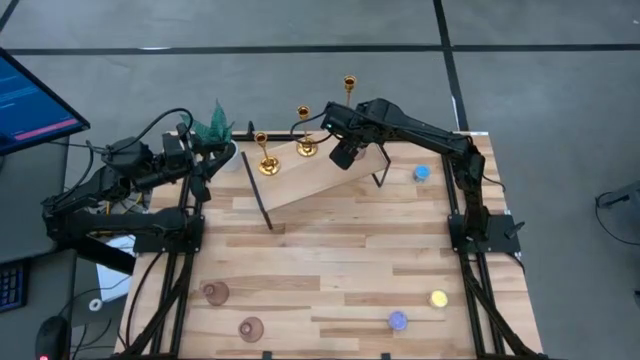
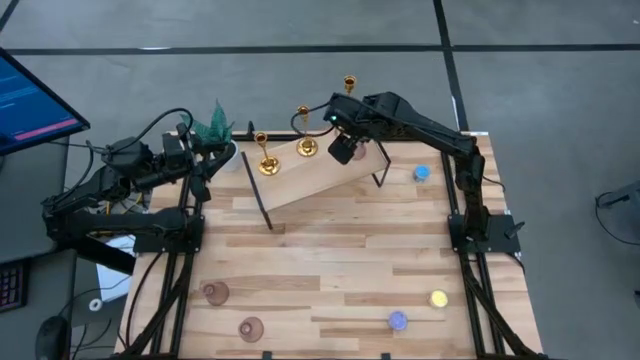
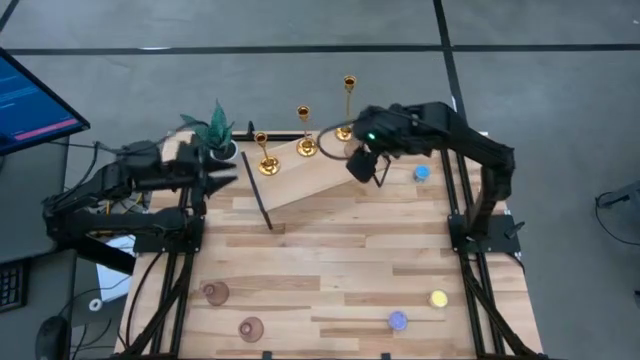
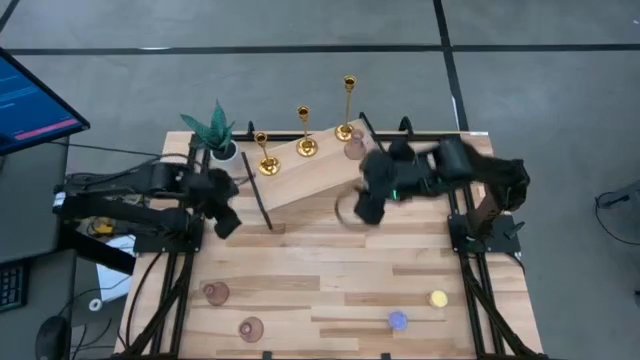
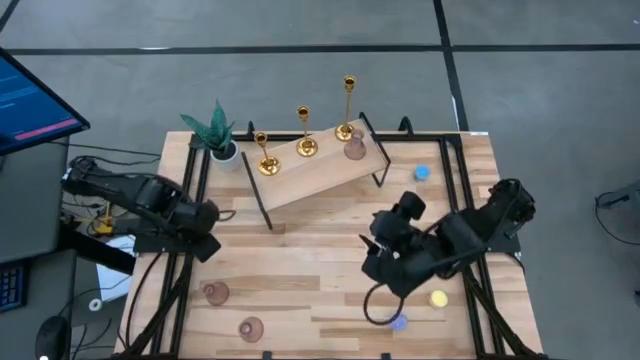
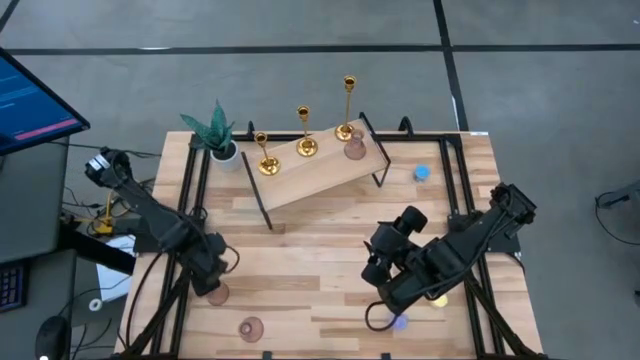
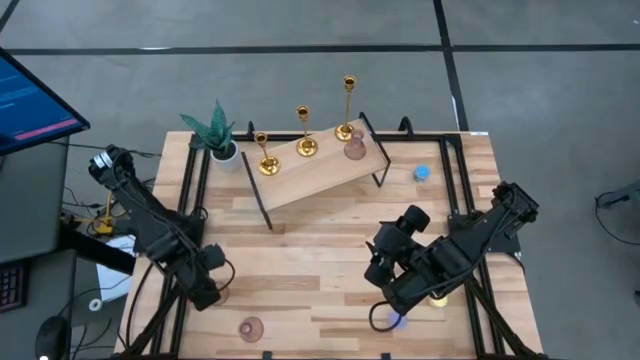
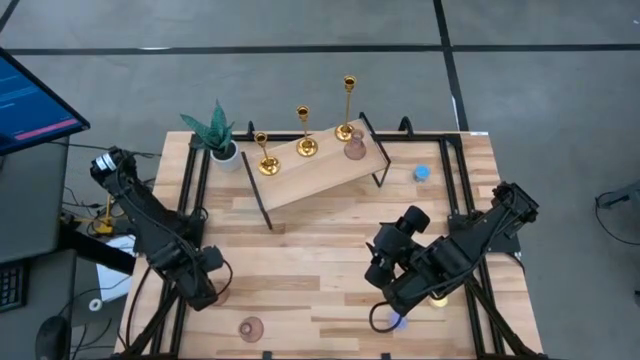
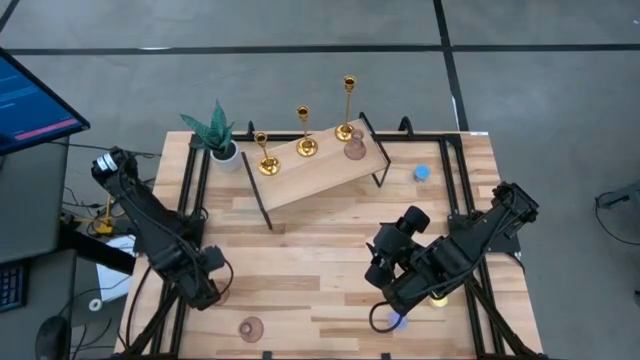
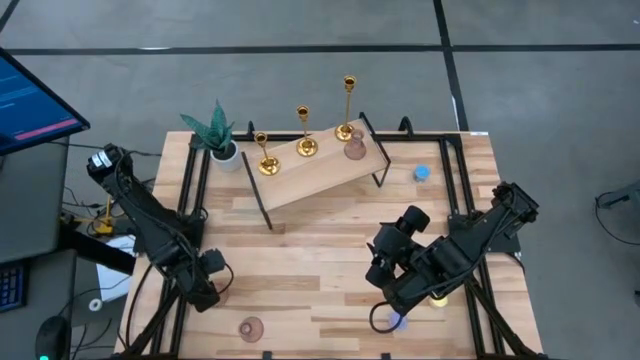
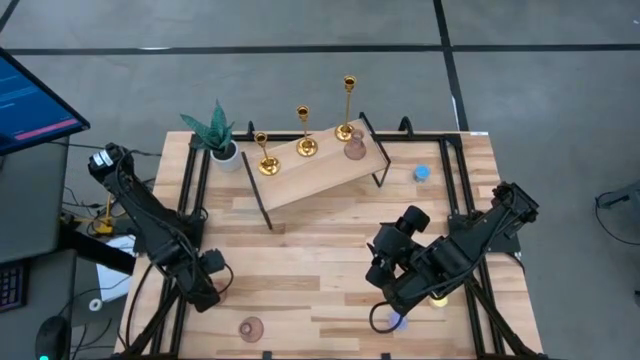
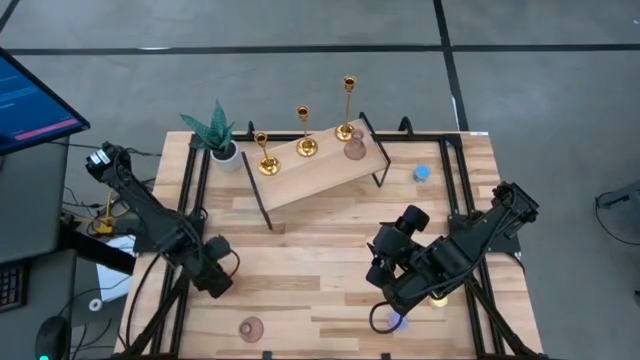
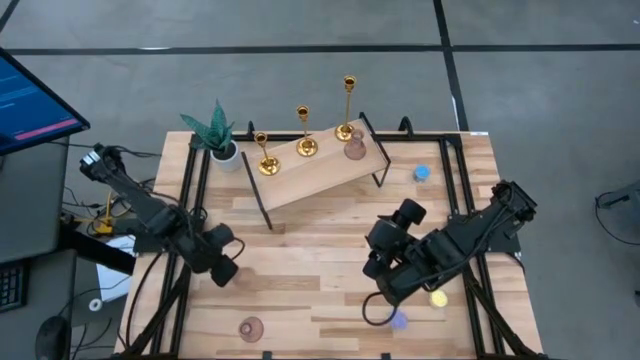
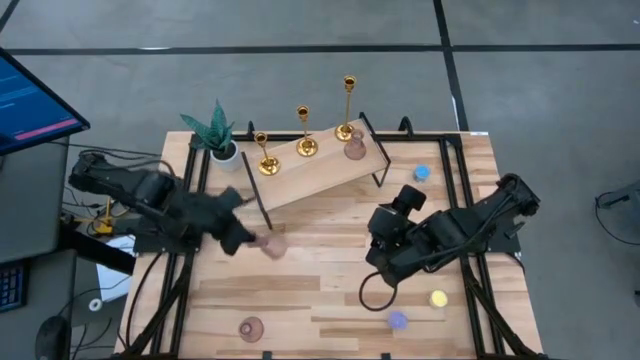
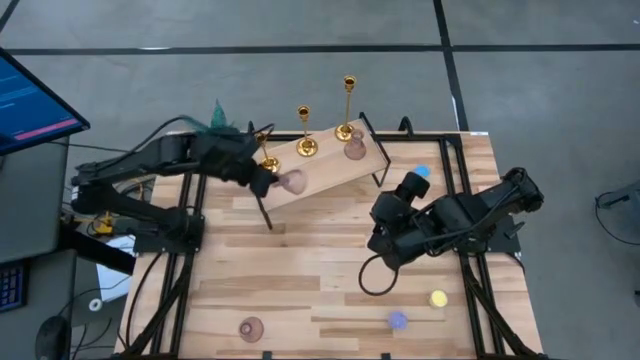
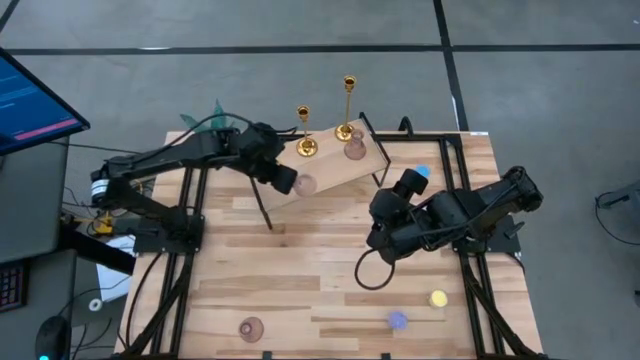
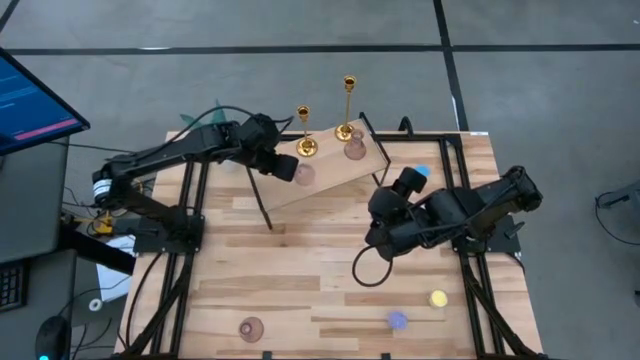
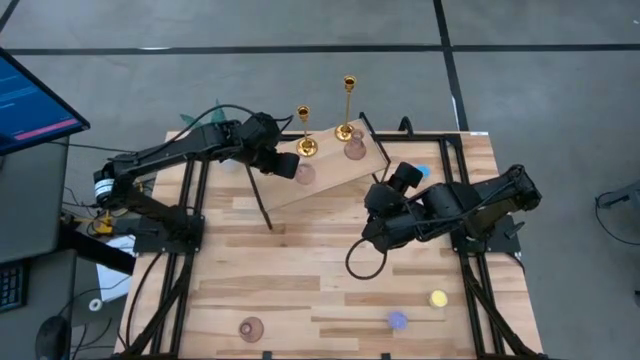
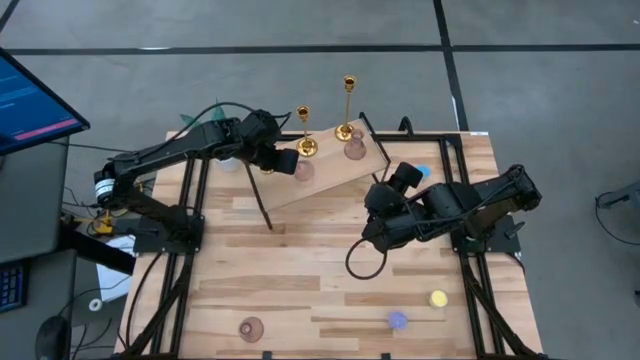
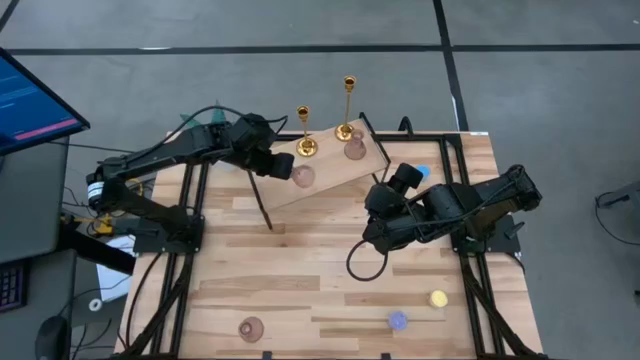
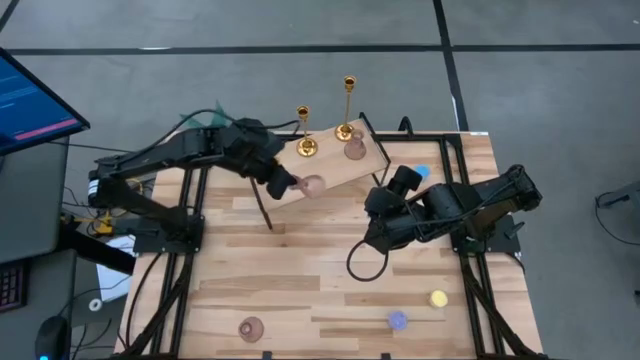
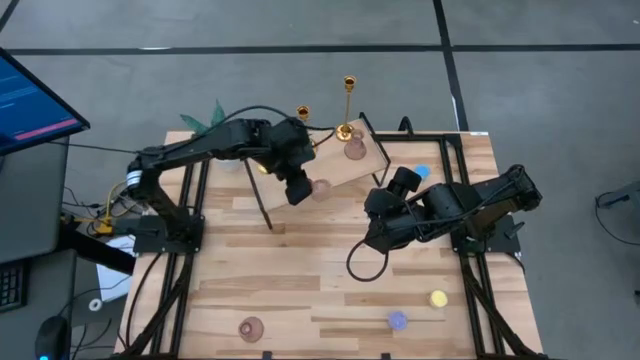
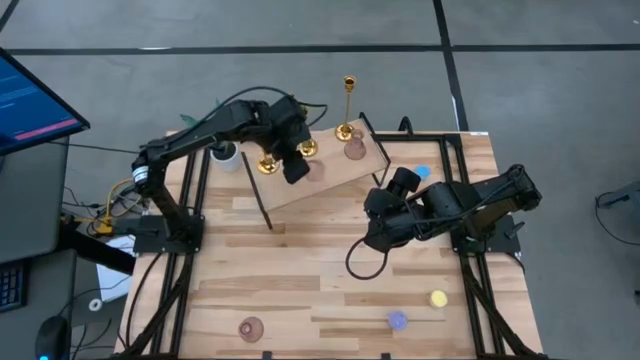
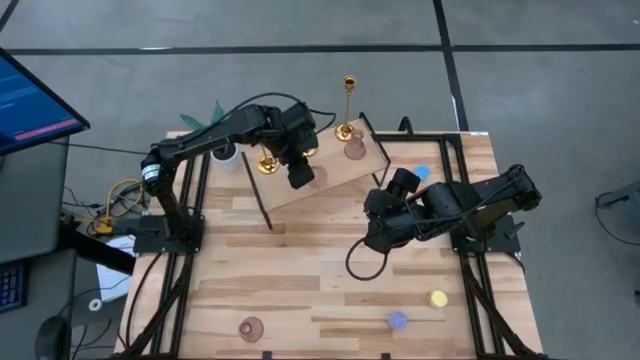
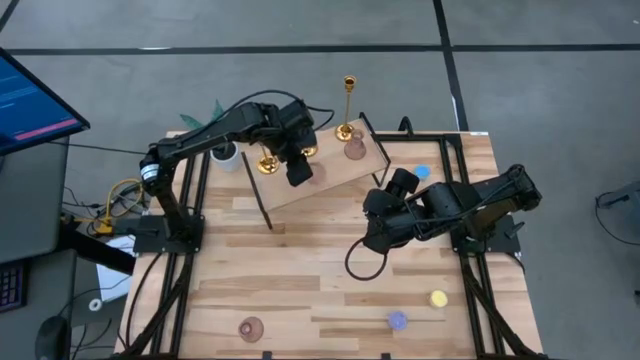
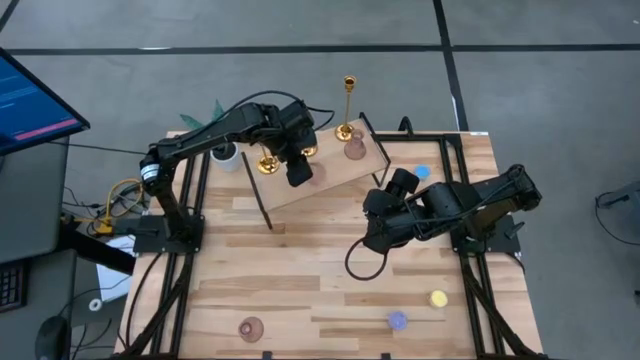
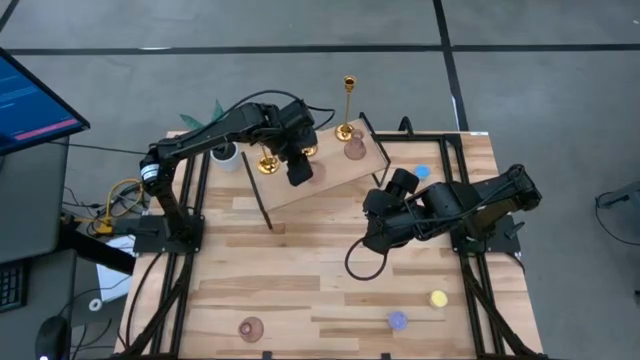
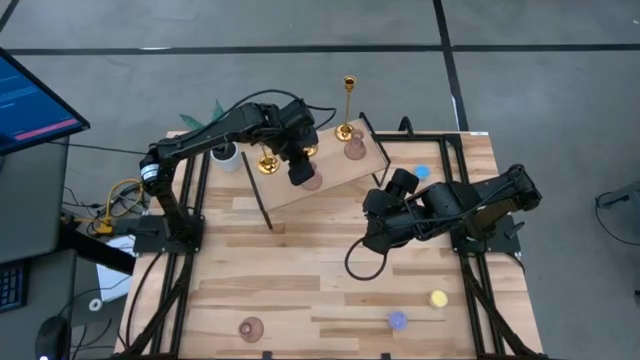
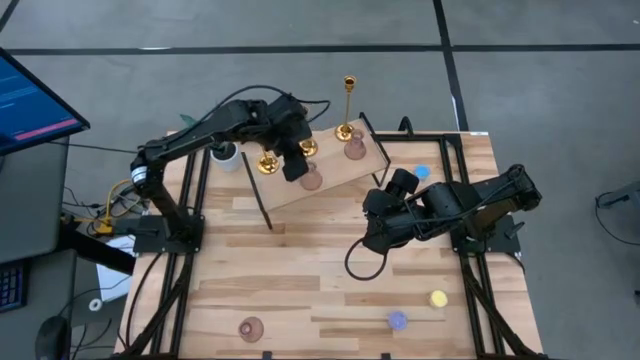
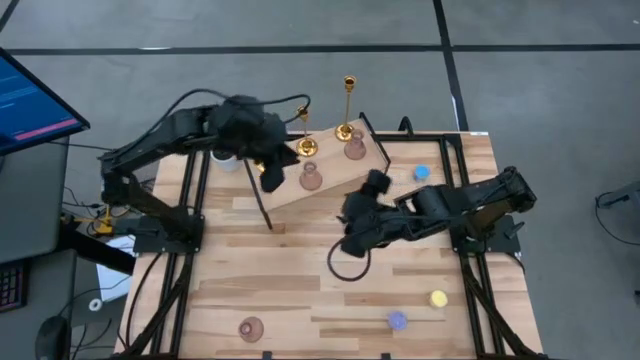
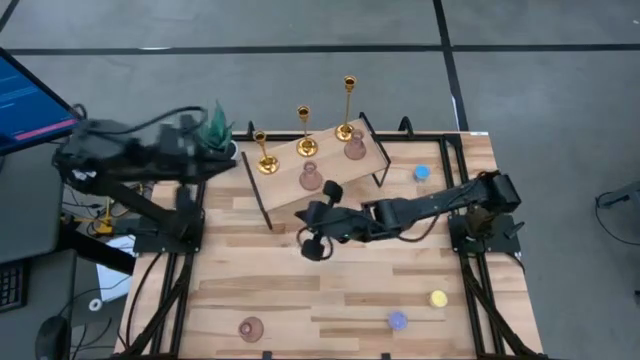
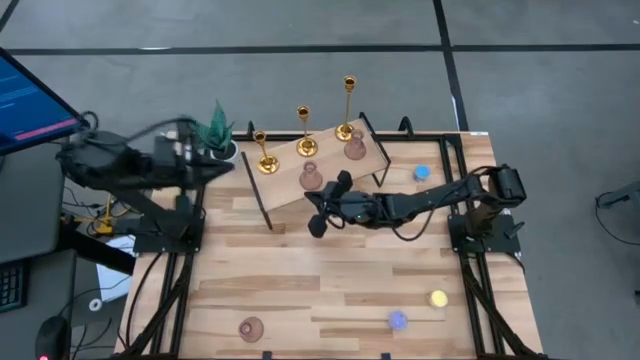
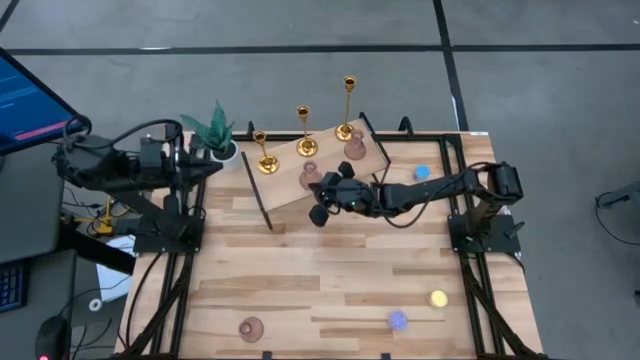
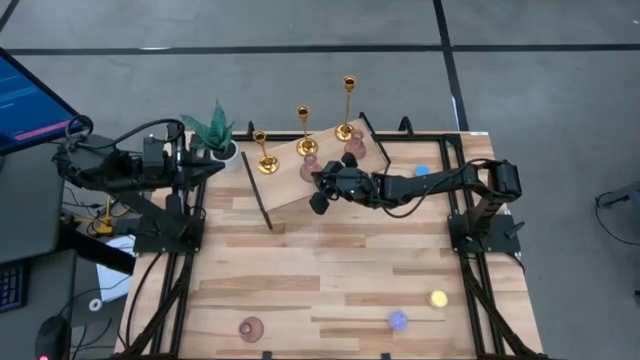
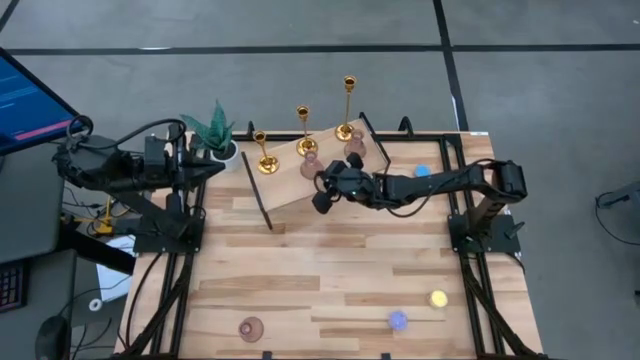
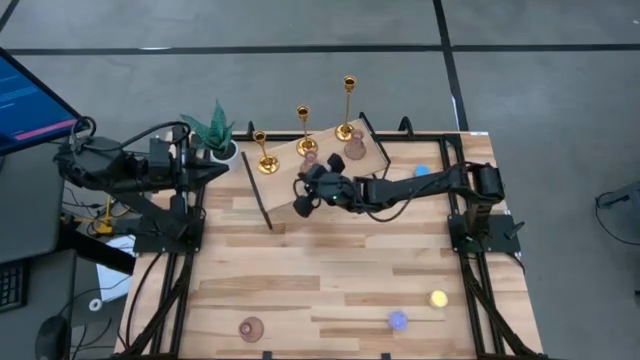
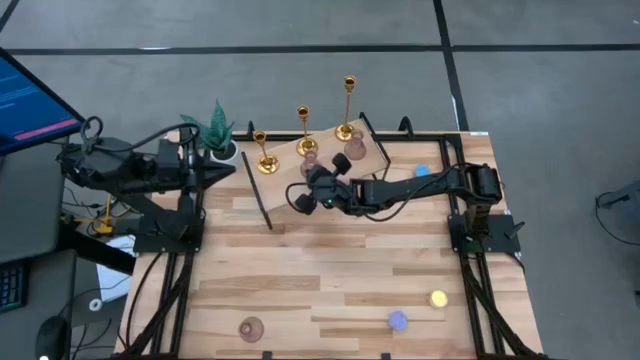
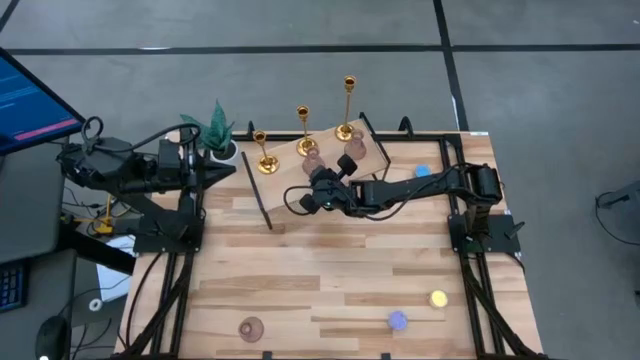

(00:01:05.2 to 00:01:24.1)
Task: Pick & Place candle stick holders
Put the top pink glass candle holder on the shelf
